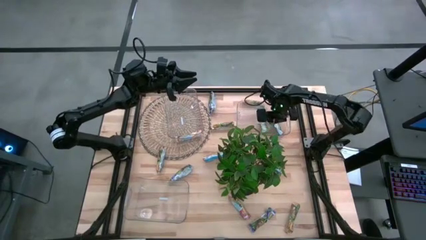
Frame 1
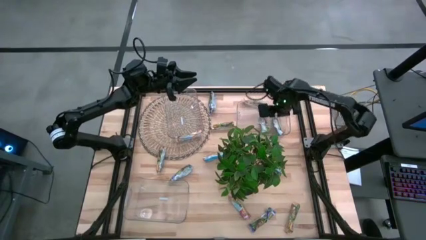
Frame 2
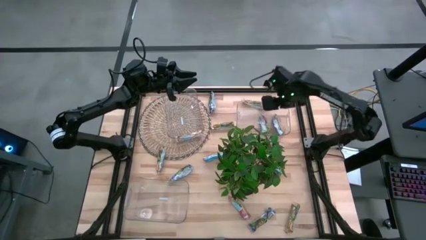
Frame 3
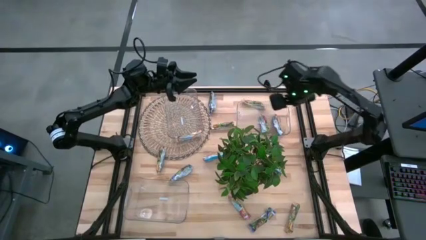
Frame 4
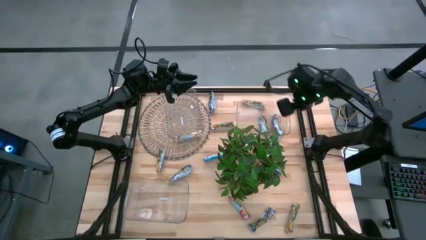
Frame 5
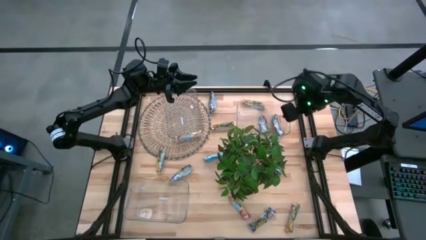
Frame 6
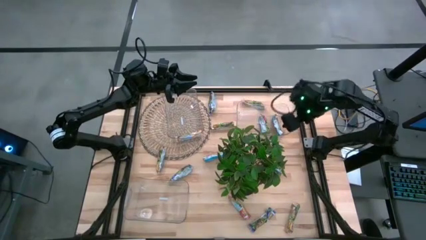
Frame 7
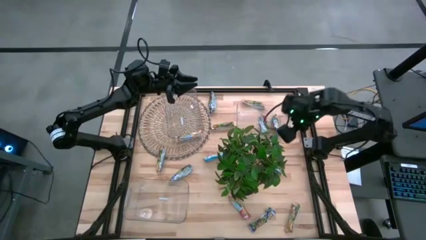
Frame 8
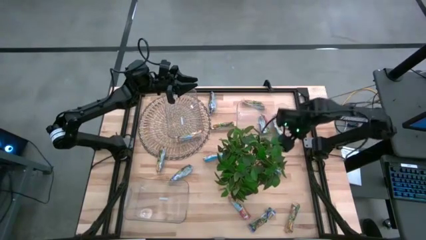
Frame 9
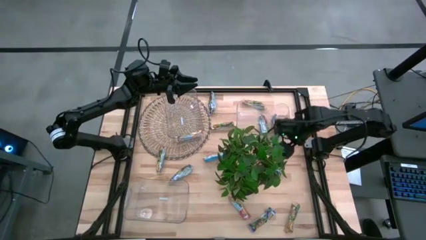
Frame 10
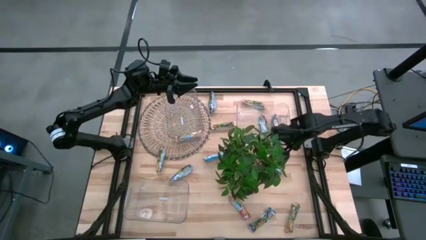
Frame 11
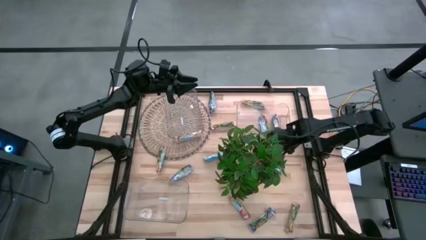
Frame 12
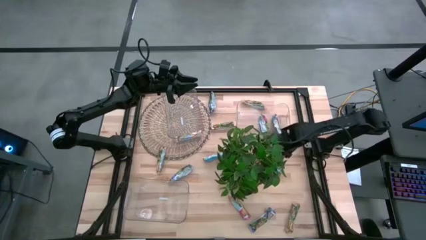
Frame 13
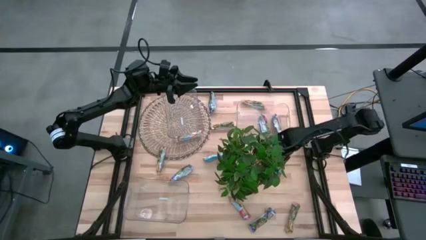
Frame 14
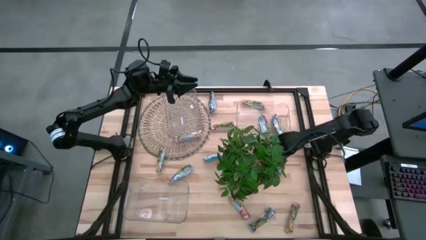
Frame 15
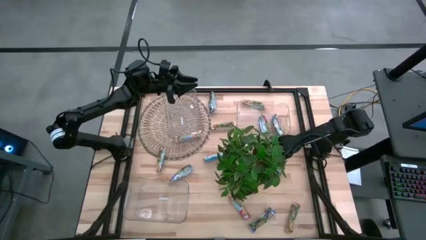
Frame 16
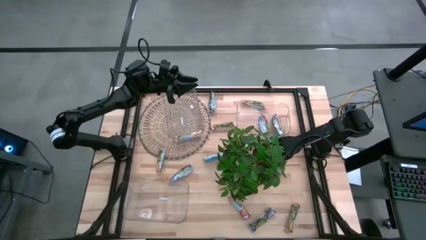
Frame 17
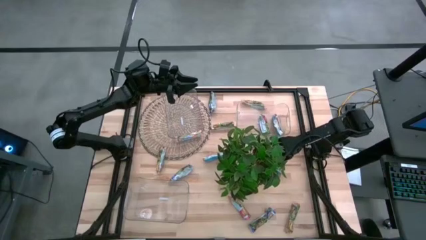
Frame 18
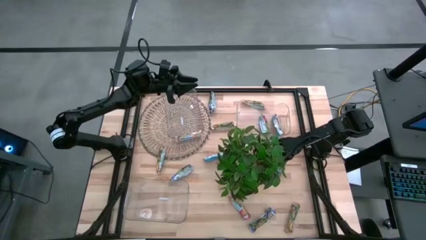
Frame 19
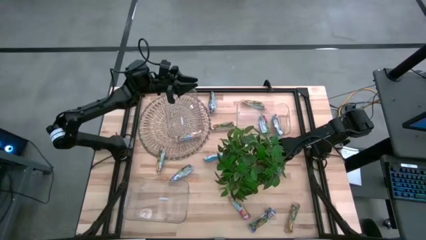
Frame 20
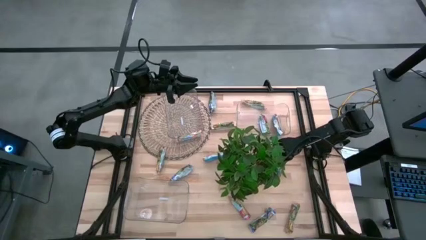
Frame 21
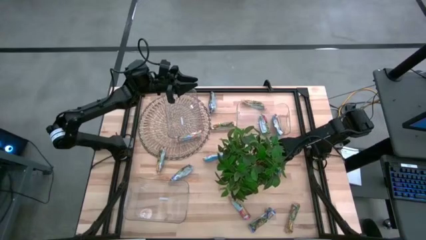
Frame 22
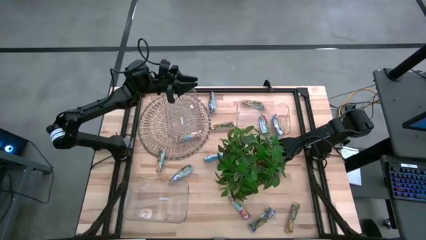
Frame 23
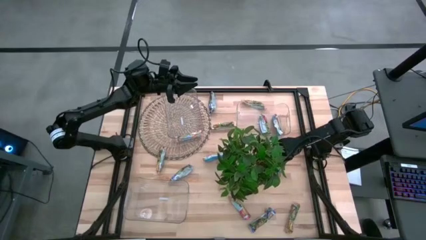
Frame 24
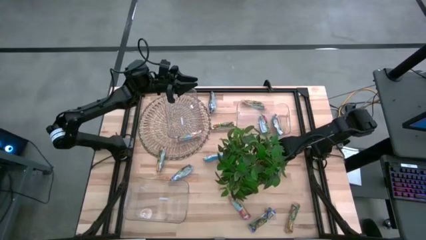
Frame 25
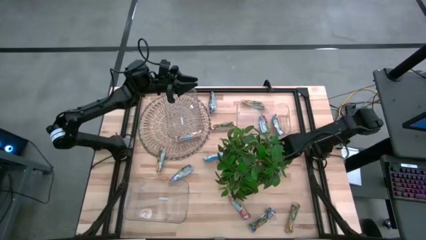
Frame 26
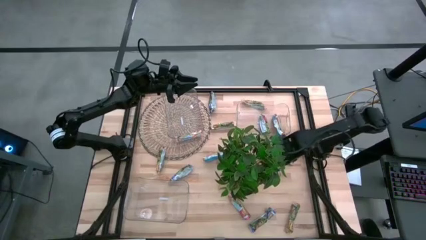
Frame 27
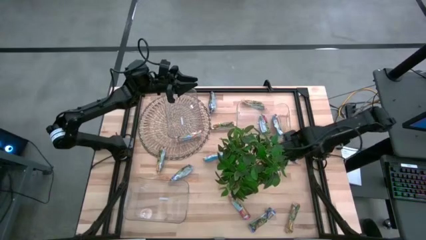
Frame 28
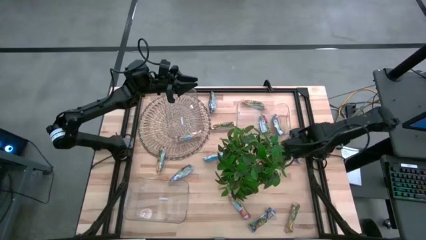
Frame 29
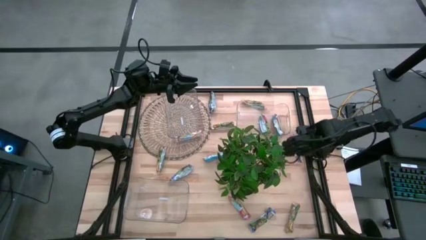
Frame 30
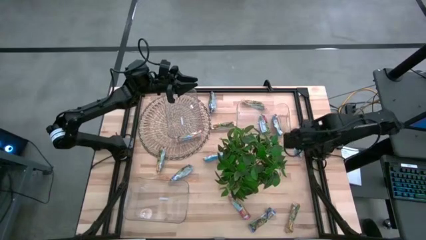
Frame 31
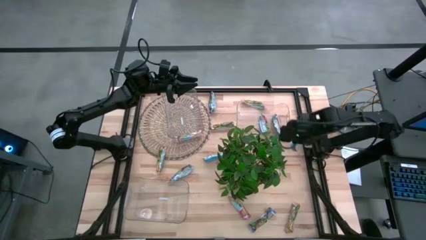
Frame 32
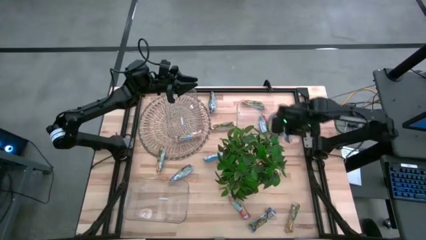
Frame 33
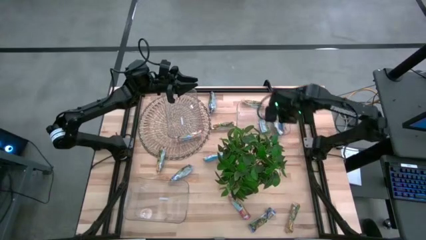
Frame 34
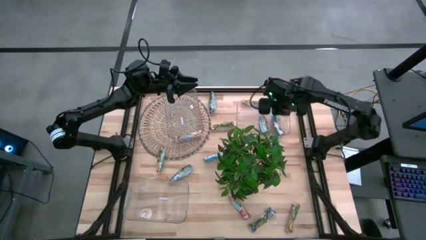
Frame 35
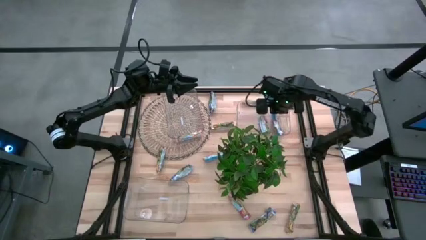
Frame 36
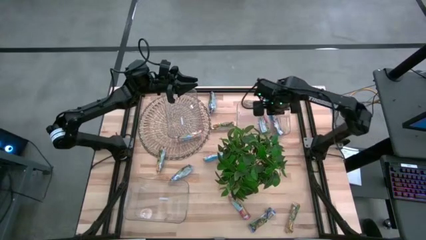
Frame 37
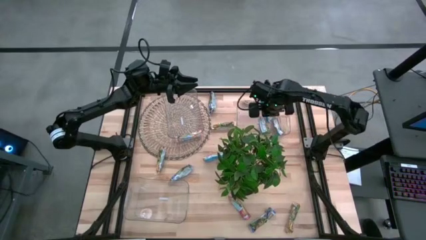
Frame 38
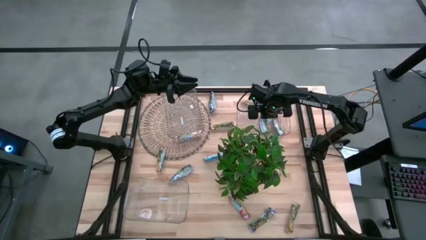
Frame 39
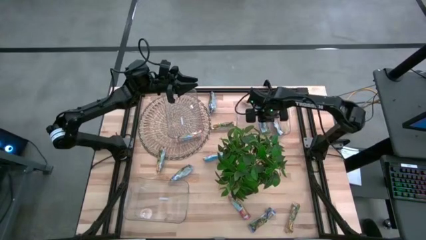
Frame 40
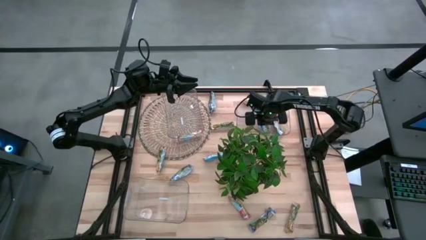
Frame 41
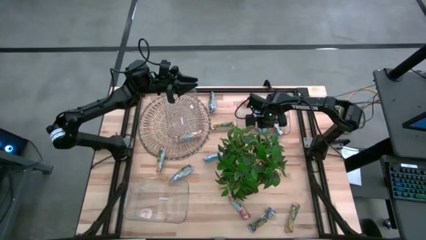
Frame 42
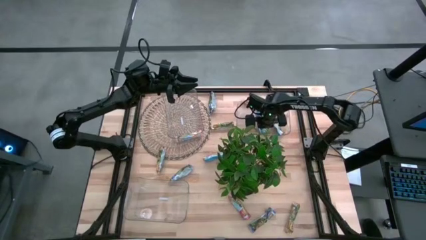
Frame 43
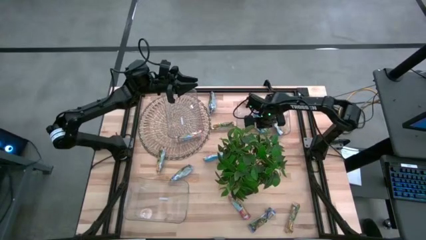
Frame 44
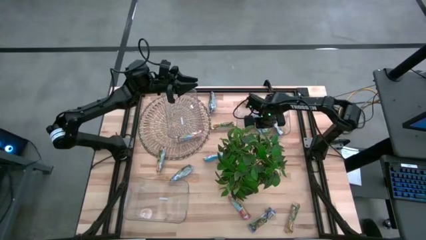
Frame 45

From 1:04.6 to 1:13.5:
Task: Pick and place Granola Bars by type
Put the top right red granola bar into the top right transparent bin

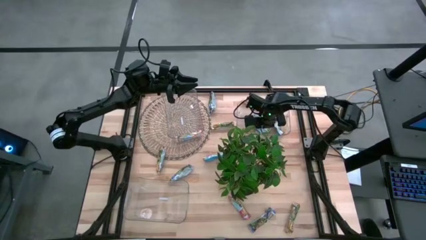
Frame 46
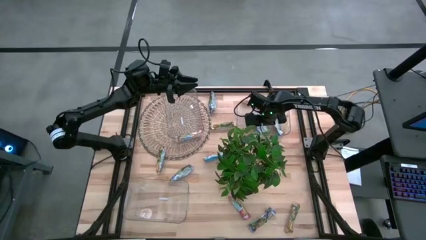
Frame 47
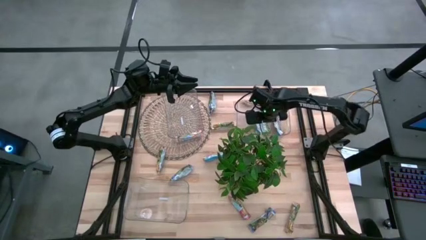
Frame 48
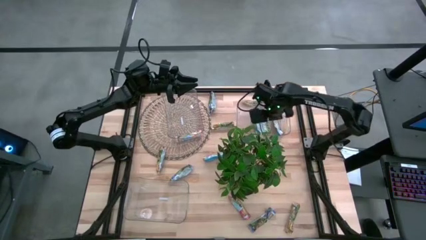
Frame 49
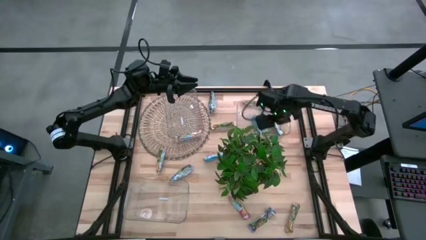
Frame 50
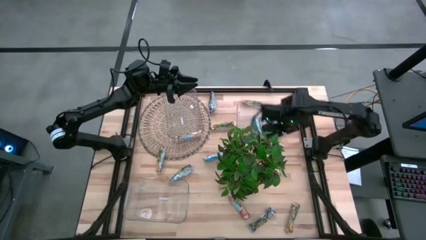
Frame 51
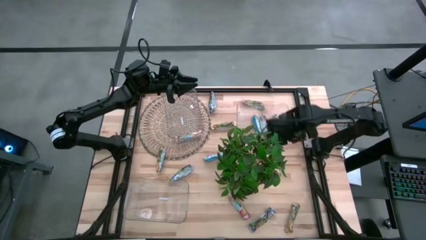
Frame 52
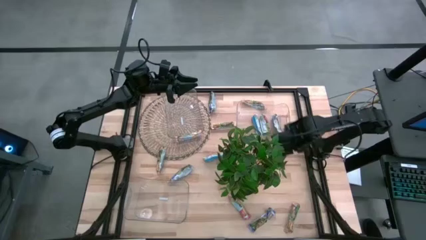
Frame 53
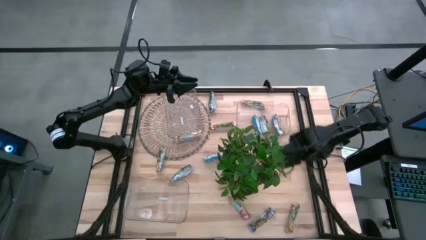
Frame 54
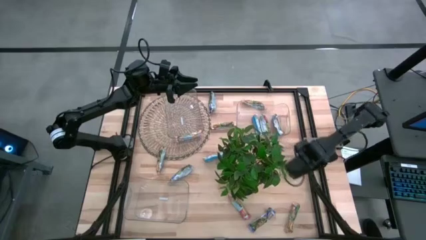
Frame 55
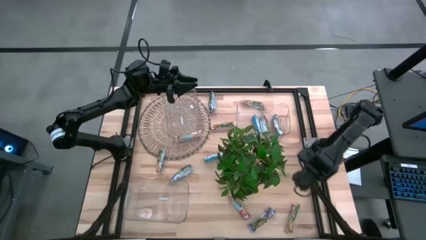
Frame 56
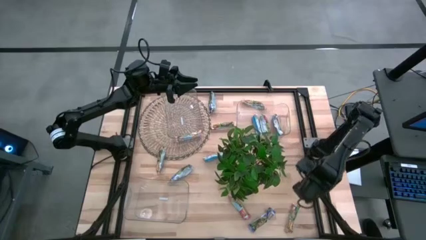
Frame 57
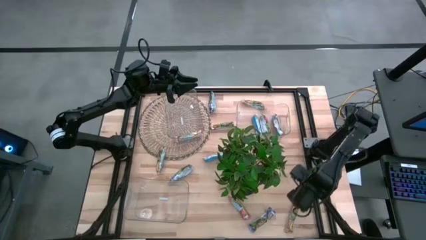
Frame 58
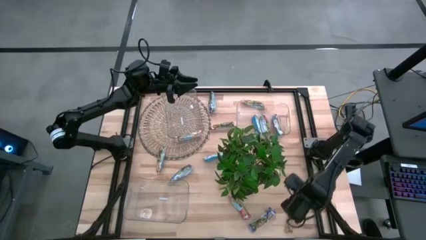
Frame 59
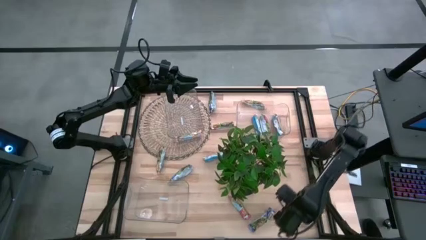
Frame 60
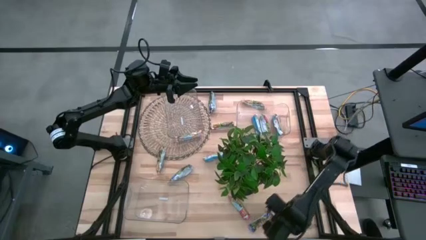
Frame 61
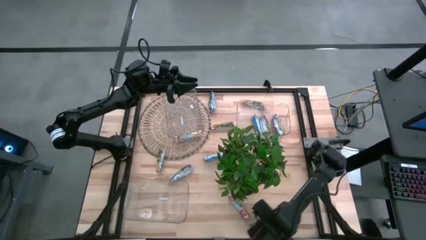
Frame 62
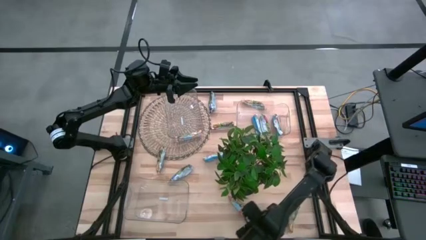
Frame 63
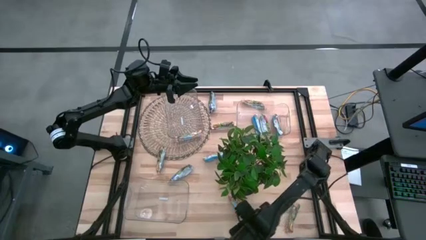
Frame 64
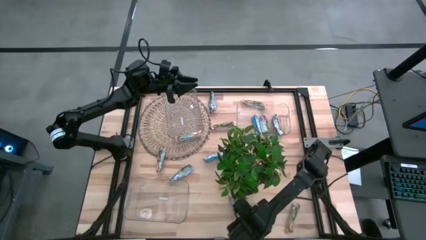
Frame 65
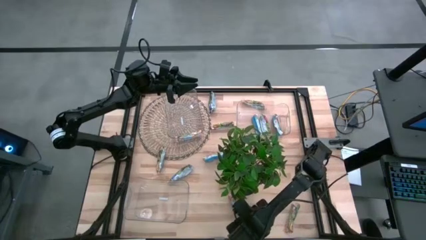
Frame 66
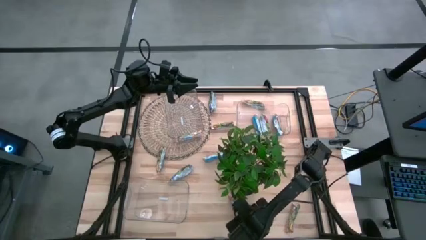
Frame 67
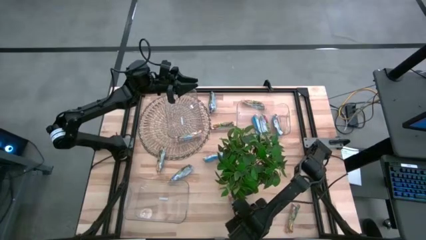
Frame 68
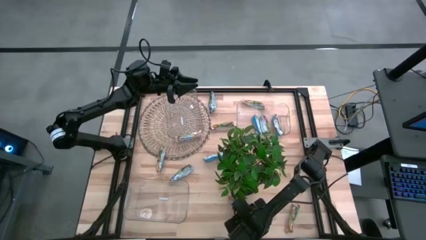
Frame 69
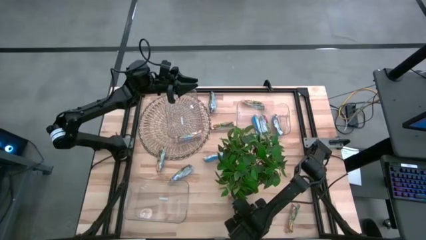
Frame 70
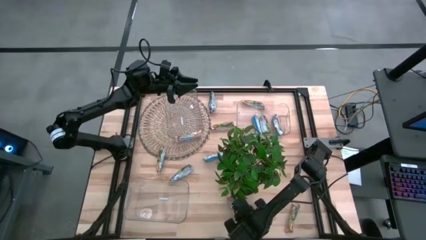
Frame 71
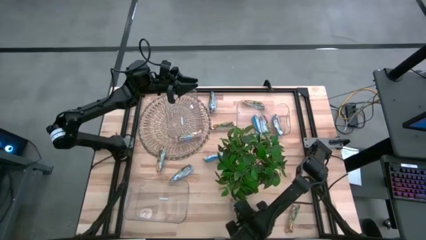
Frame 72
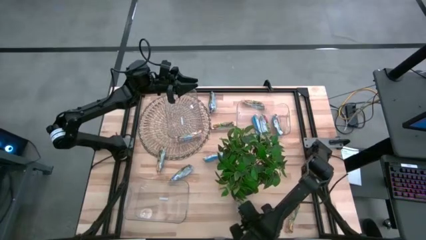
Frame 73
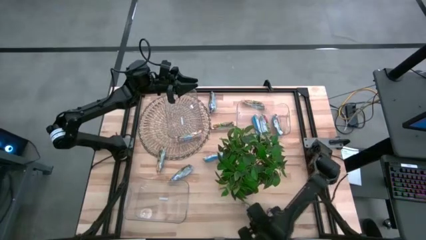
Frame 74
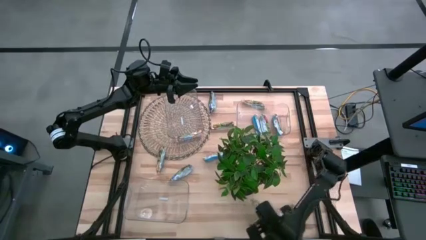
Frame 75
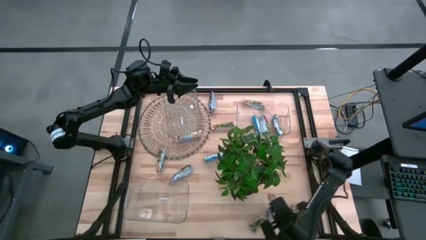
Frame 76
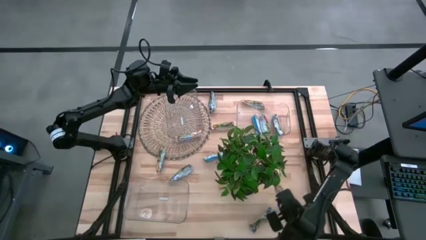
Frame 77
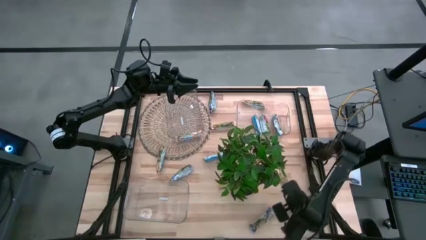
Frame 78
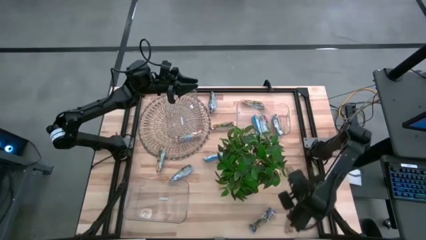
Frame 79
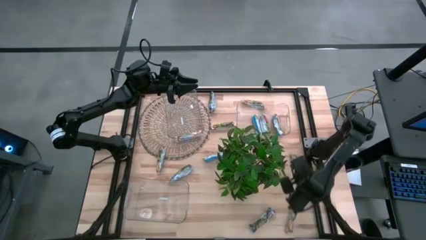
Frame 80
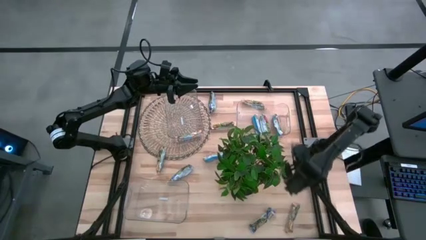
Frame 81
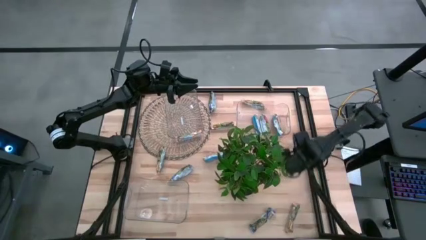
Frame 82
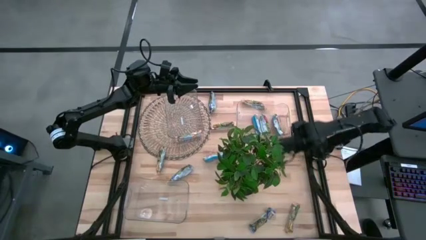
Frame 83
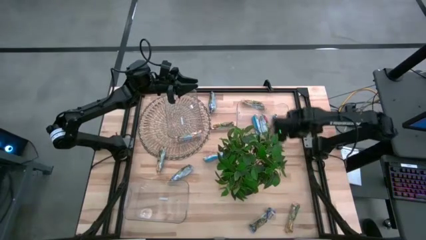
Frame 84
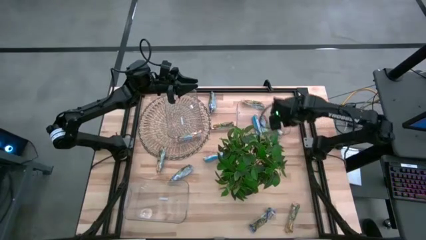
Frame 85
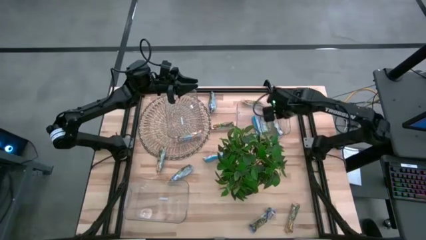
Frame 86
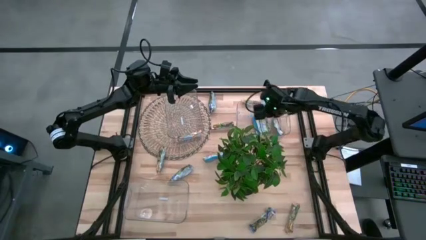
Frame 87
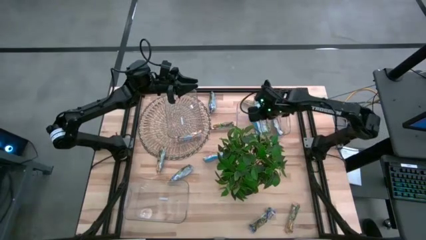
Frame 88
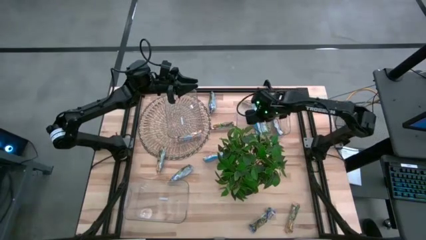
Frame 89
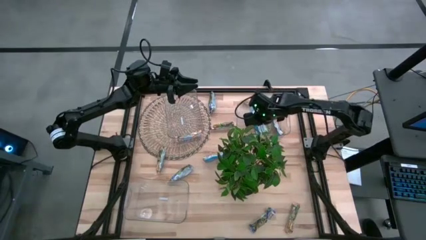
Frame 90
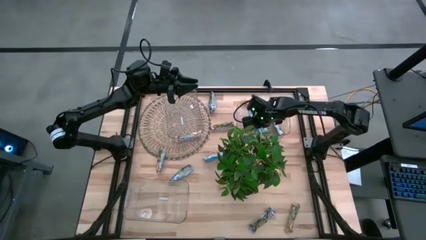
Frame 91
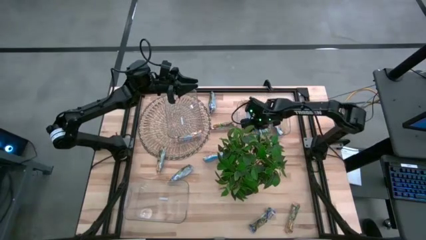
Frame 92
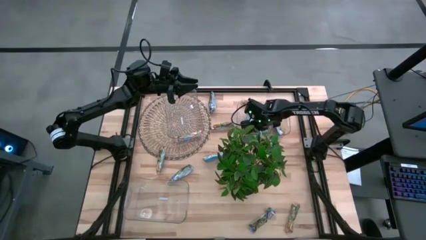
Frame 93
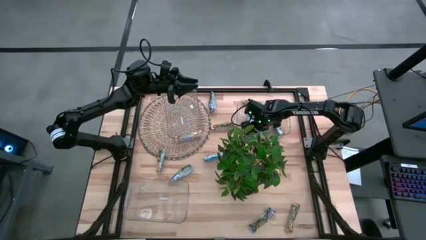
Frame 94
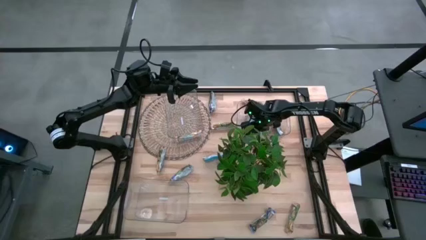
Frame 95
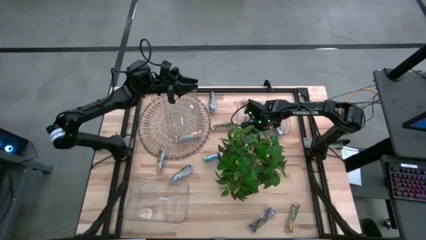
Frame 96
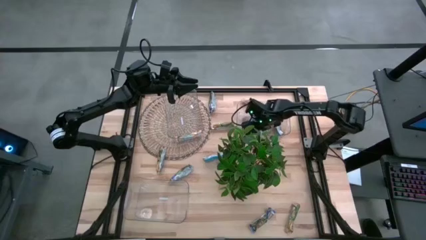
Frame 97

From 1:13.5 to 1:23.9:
Put the bottom red granola bar into the top right transparent bin
